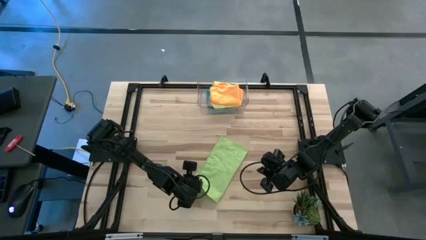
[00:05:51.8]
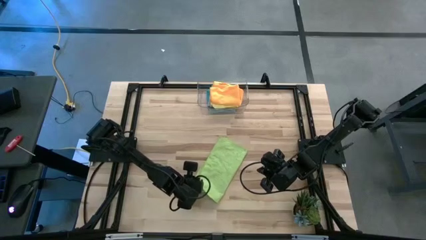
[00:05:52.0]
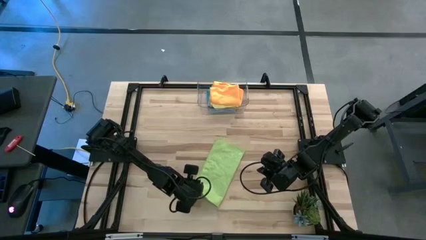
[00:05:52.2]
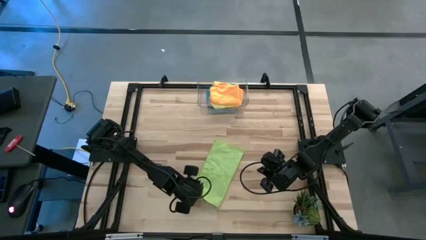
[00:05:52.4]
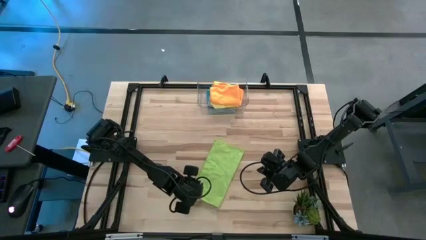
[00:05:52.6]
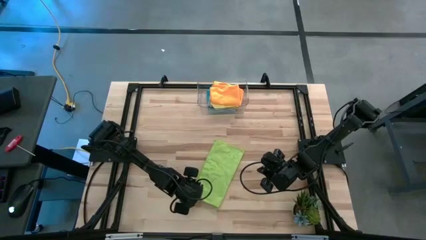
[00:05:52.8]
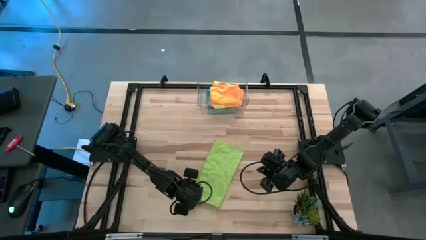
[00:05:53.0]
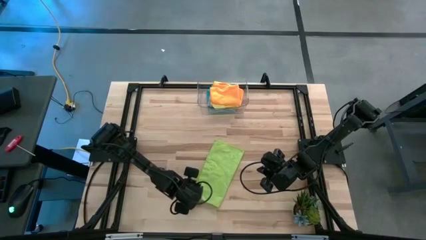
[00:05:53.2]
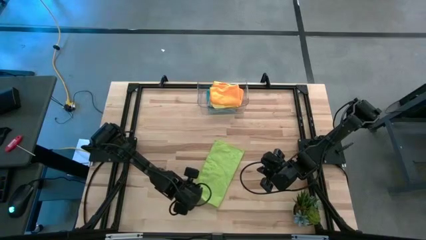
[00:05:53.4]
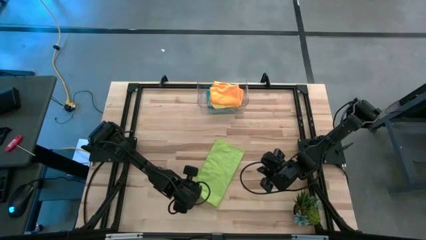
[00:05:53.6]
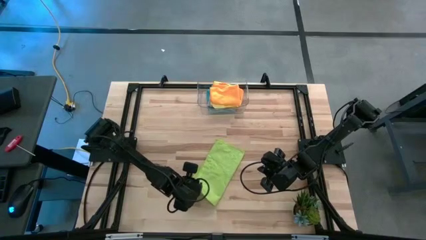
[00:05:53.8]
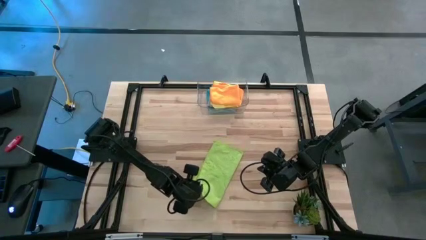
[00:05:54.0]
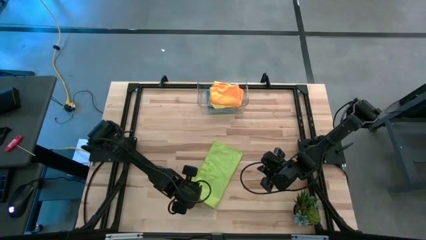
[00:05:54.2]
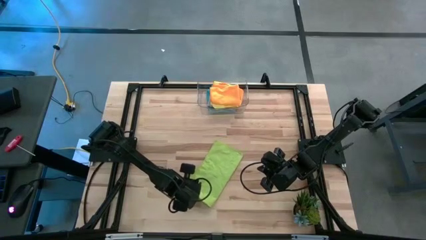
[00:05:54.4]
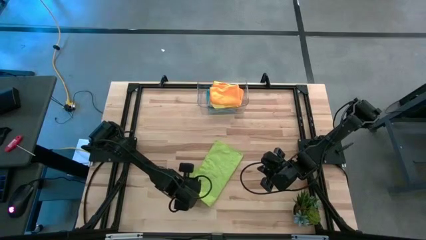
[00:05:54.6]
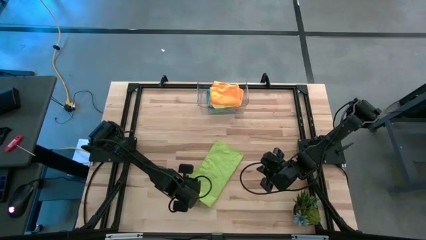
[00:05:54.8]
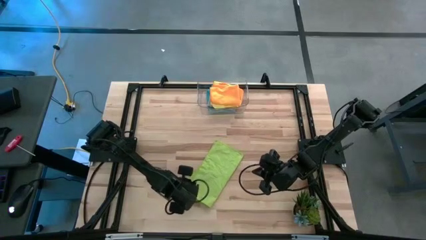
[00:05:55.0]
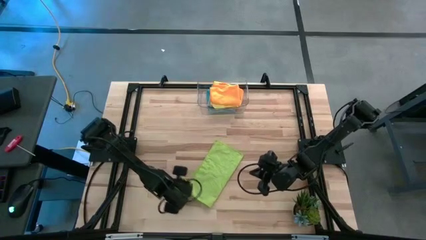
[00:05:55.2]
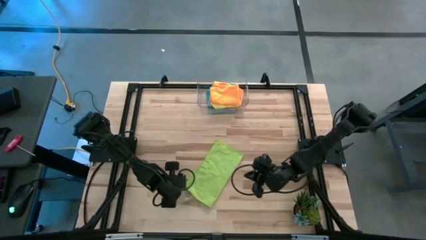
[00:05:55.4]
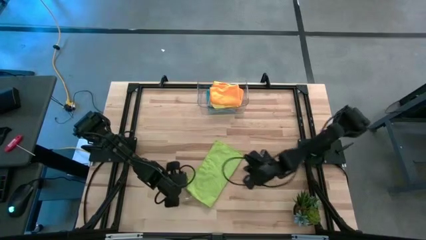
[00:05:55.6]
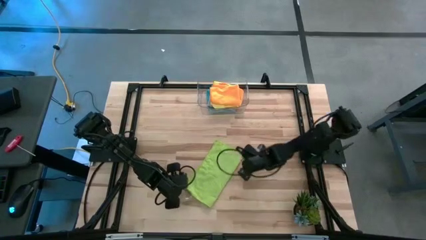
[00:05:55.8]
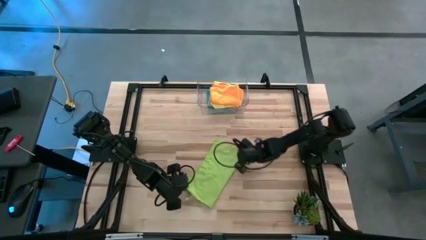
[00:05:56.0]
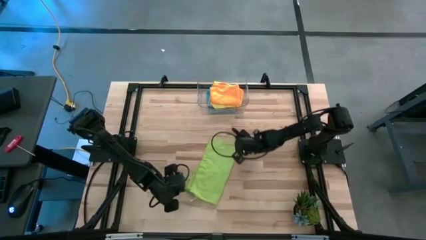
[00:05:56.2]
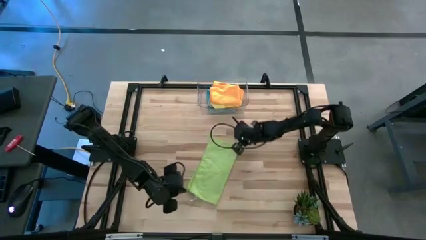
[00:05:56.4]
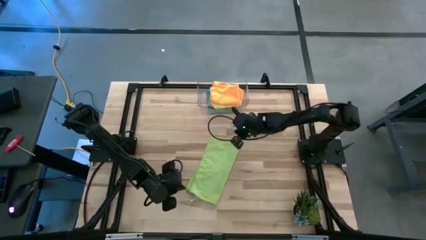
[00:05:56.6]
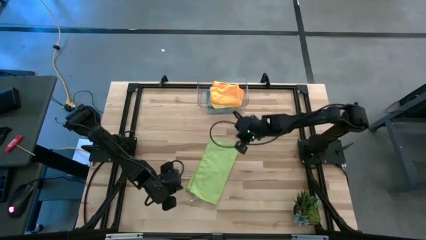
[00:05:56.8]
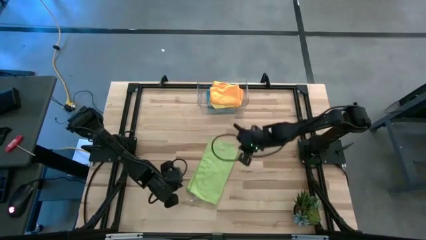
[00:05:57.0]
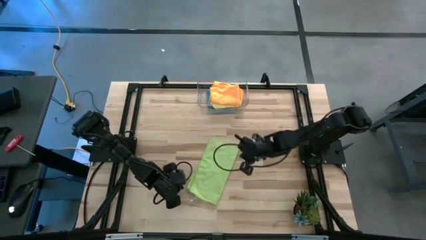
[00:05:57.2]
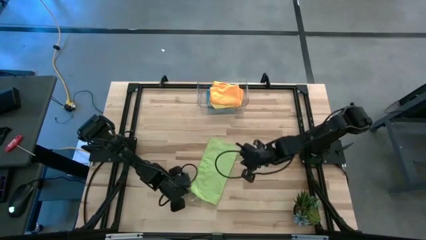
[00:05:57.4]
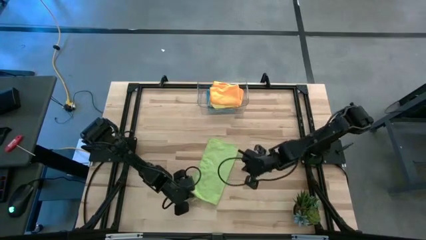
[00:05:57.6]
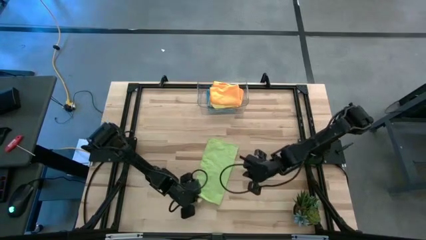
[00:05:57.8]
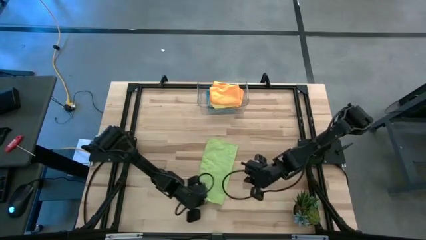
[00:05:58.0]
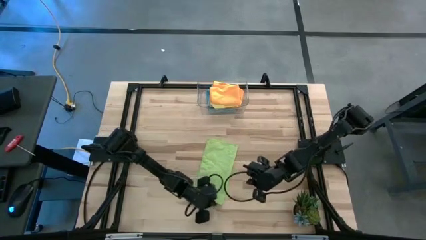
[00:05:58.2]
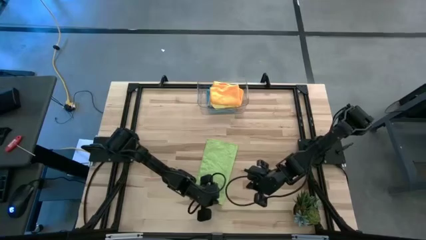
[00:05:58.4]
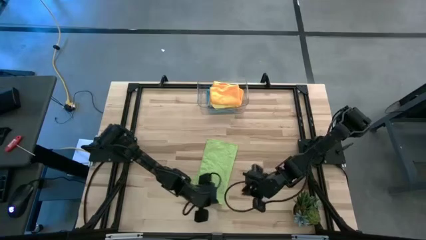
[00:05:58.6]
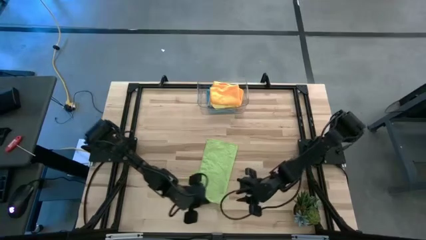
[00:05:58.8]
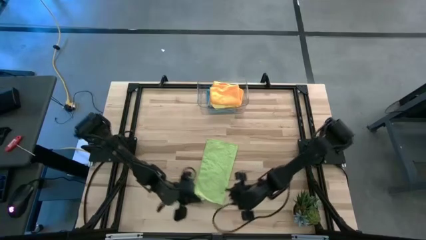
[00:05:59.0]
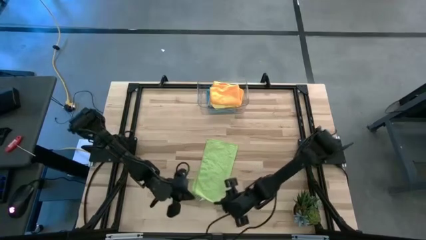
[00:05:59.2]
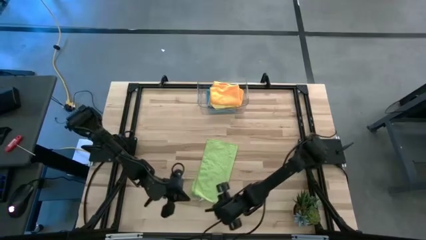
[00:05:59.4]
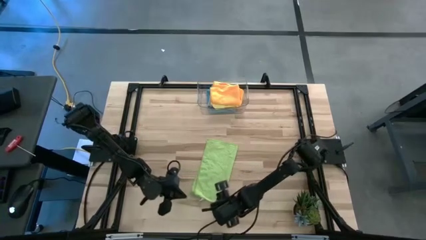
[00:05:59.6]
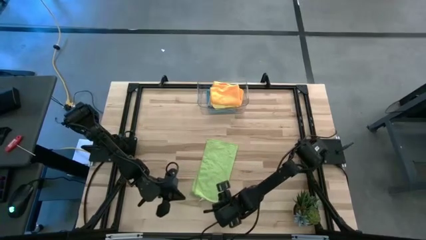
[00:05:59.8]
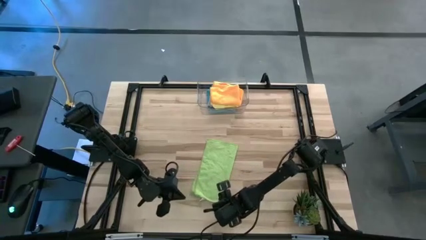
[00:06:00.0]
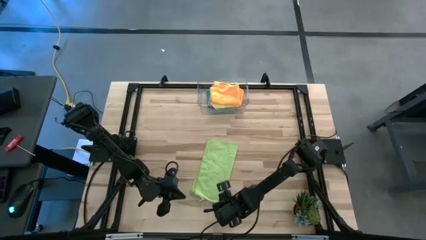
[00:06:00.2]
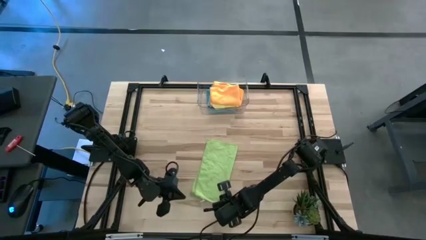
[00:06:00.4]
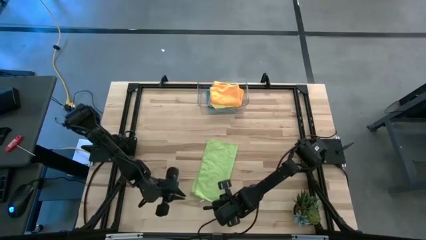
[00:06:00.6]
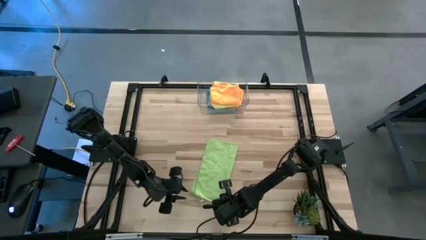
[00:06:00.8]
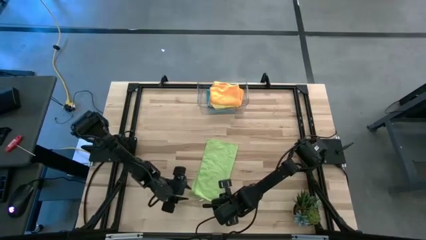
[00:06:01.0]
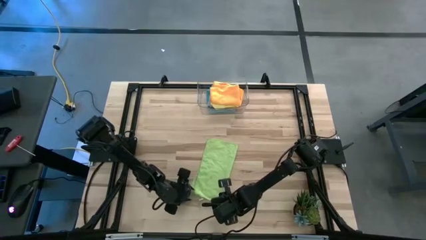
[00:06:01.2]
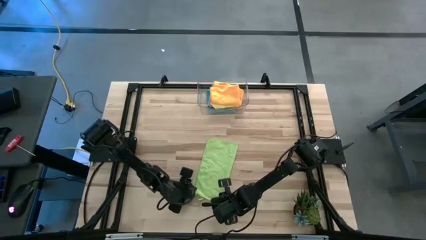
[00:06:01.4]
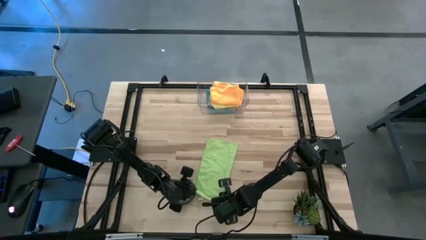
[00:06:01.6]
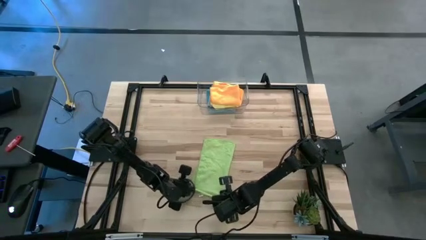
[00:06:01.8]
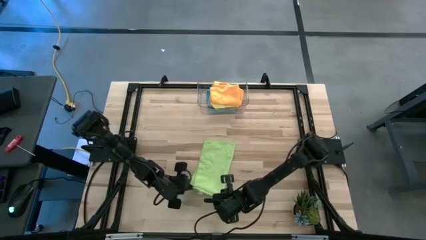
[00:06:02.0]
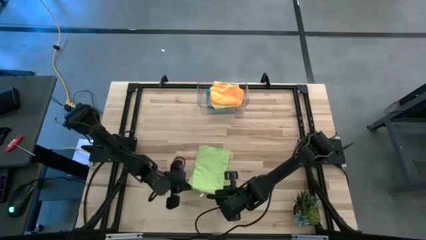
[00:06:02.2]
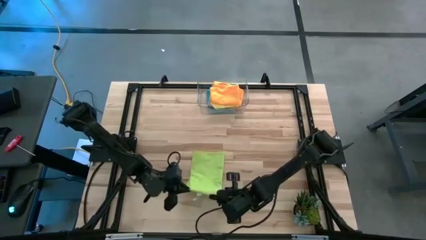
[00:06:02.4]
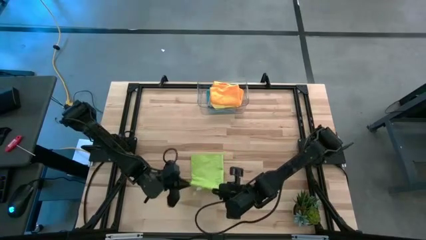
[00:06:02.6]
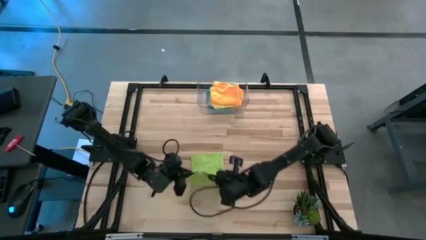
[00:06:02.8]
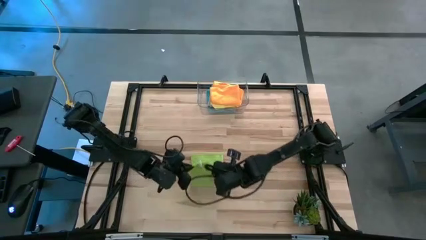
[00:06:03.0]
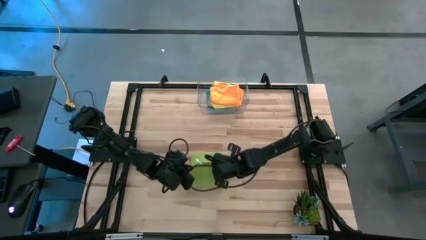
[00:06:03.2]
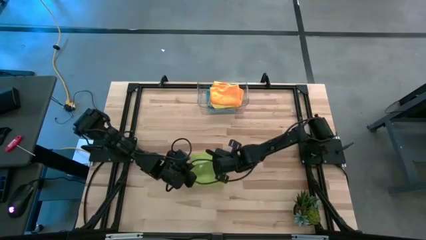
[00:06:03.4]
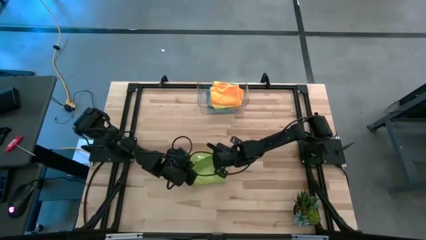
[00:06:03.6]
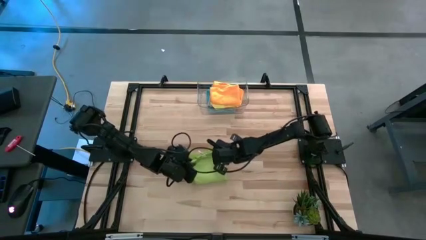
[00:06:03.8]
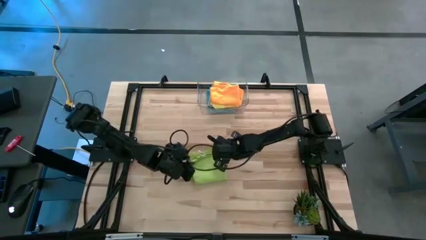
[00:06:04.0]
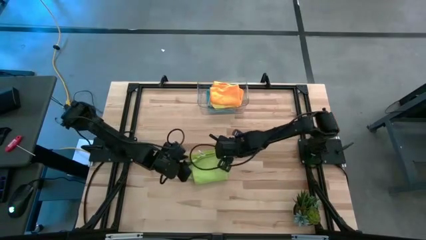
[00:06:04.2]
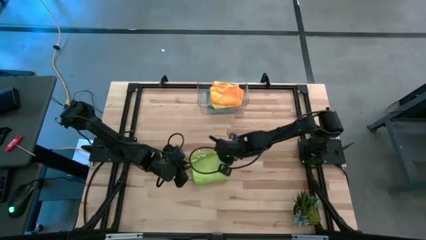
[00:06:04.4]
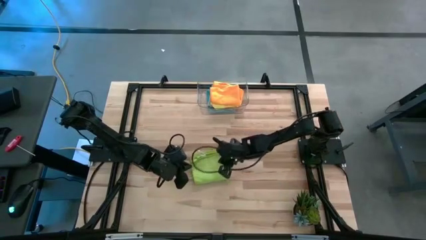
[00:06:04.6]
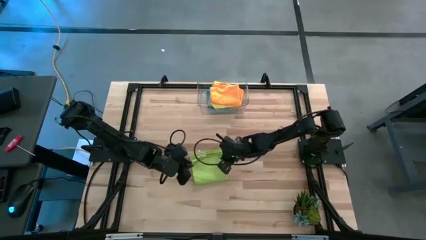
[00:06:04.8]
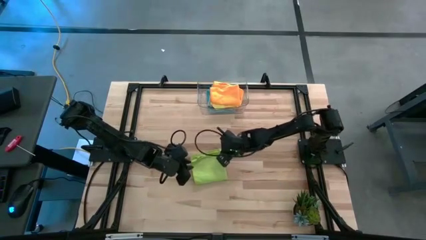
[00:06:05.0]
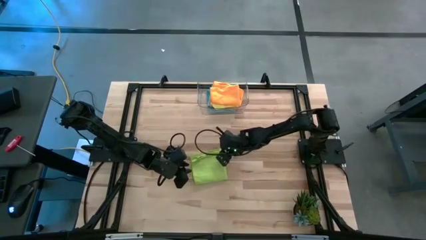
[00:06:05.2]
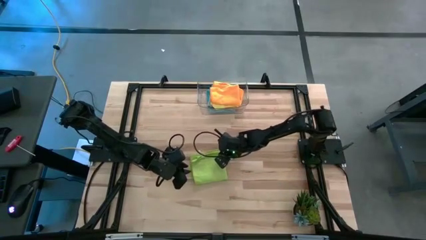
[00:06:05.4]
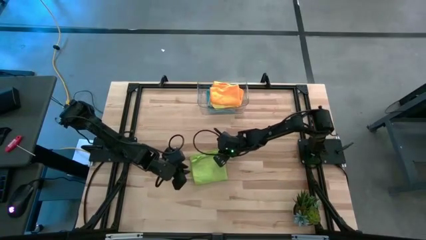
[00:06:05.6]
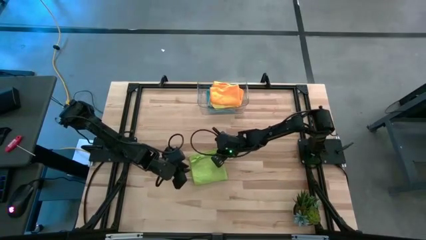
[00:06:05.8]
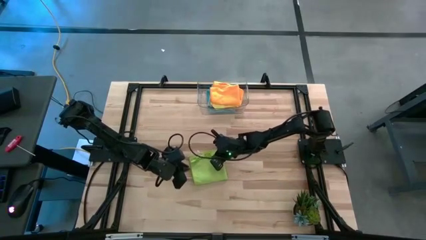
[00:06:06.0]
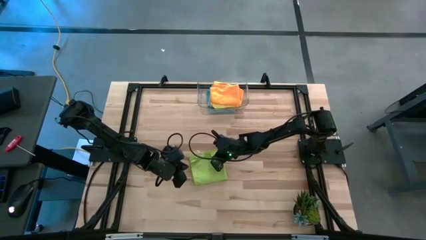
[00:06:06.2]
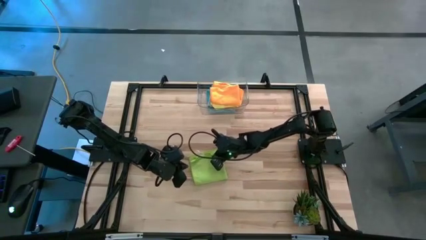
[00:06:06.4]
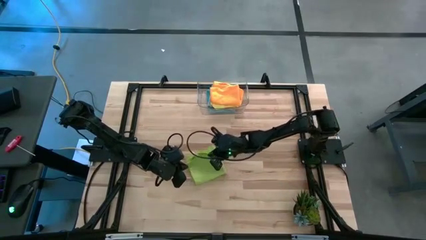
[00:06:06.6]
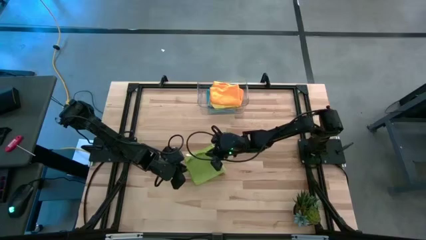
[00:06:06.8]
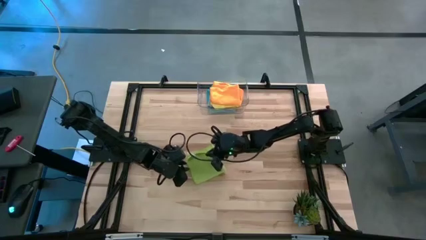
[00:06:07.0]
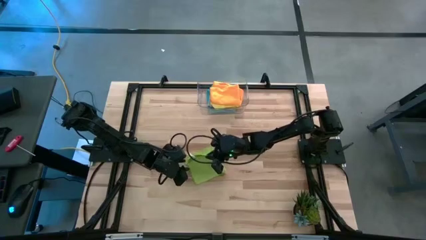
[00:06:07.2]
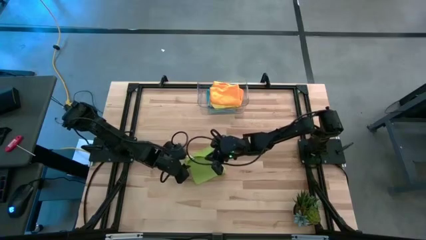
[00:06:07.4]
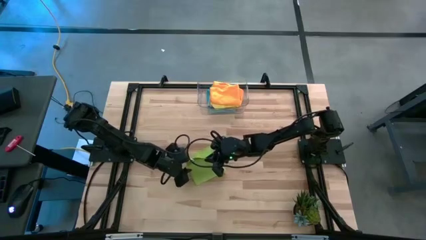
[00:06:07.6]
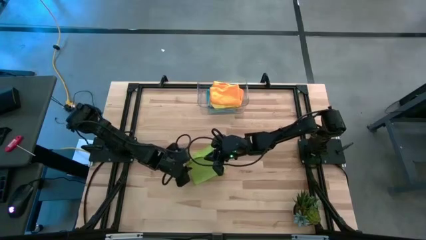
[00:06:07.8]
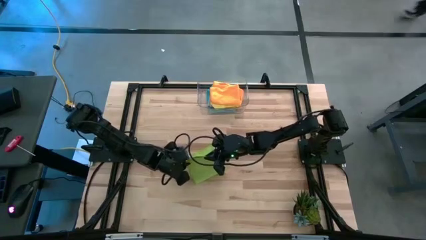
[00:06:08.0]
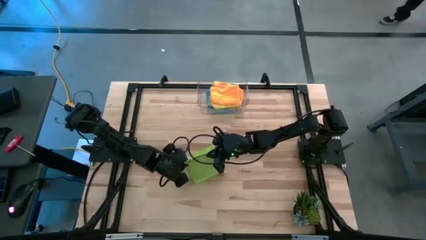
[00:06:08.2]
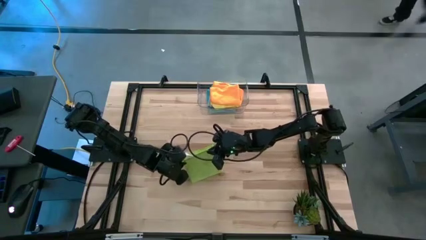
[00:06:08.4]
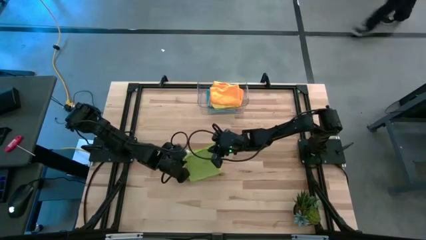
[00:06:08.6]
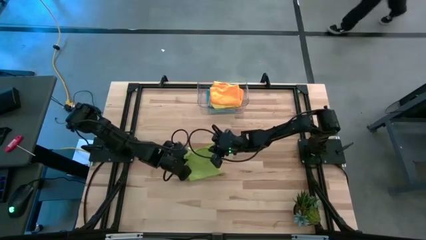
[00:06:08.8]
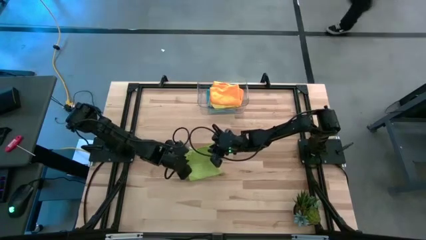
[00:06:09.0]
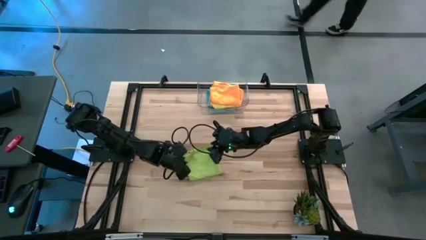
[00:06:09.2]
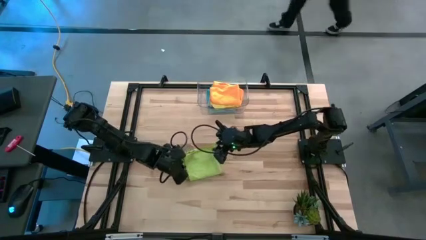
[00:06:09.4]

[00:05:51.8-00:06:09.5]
Task: Fold microfiber towels
Fold the green towel
